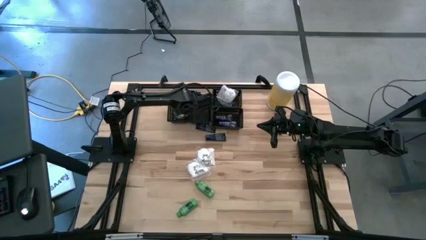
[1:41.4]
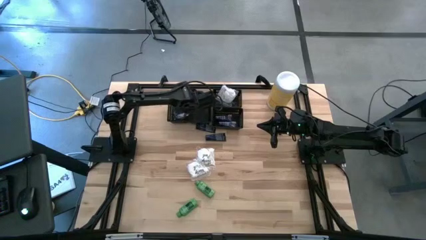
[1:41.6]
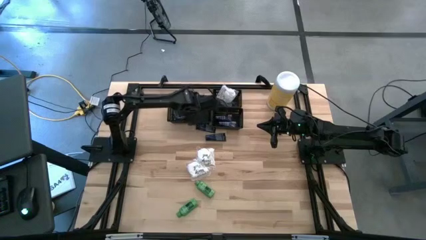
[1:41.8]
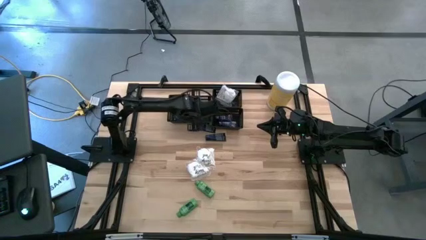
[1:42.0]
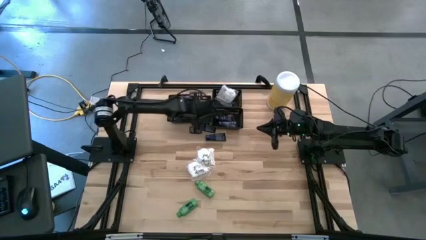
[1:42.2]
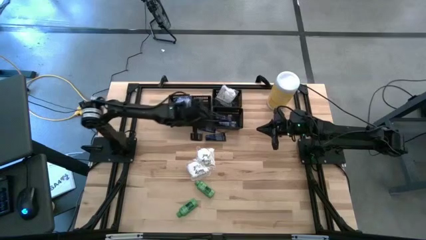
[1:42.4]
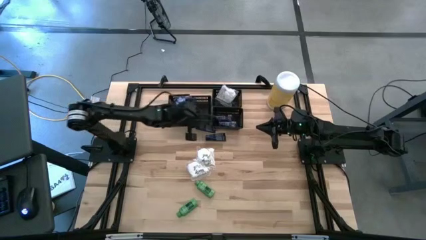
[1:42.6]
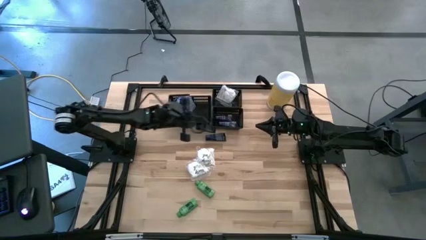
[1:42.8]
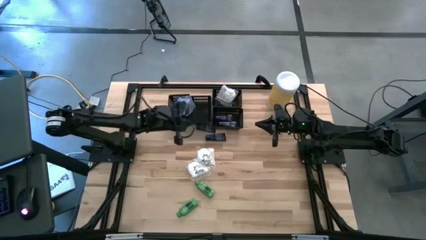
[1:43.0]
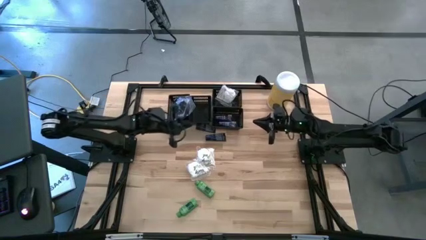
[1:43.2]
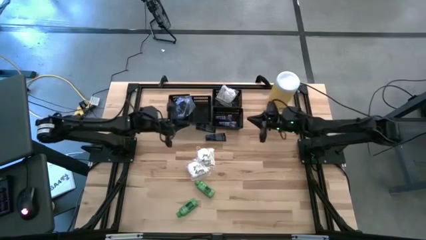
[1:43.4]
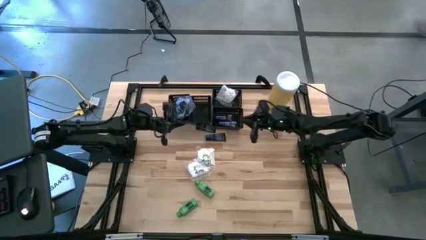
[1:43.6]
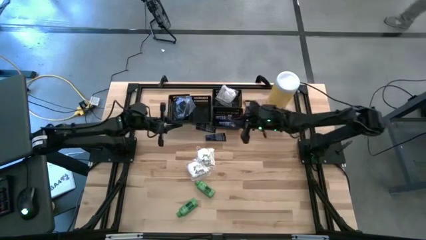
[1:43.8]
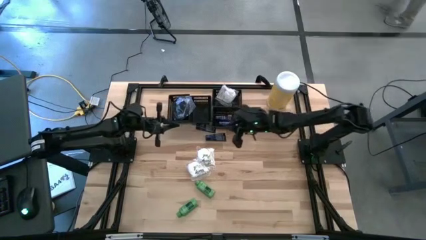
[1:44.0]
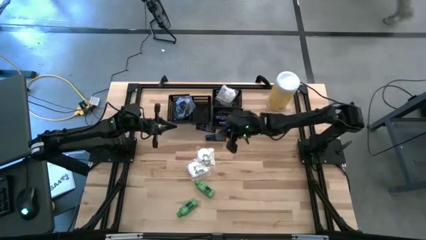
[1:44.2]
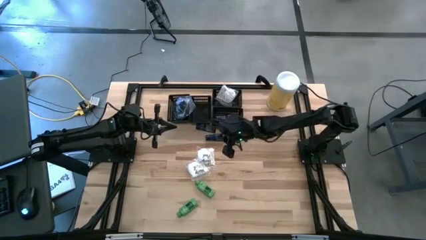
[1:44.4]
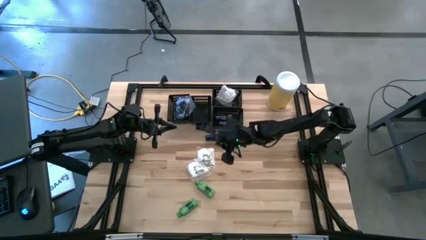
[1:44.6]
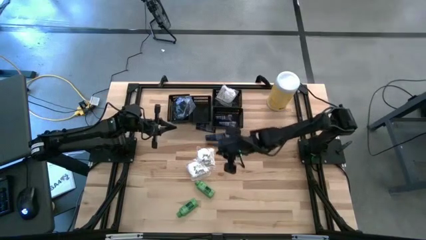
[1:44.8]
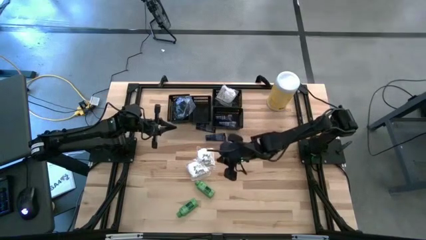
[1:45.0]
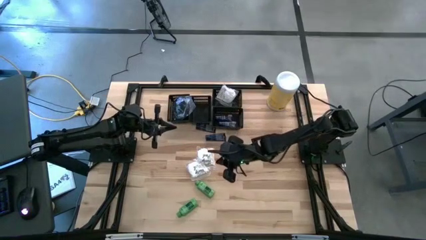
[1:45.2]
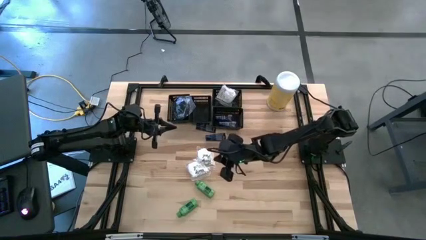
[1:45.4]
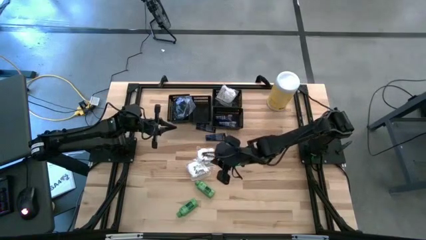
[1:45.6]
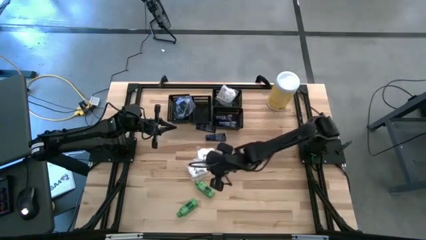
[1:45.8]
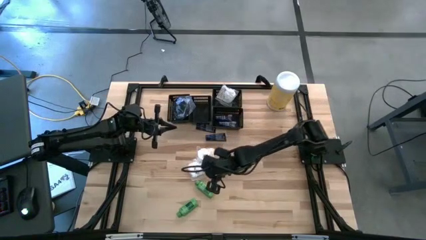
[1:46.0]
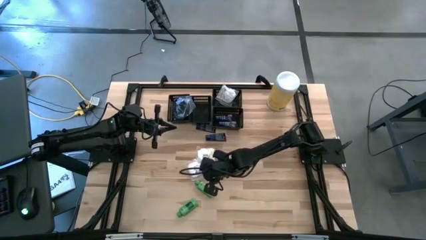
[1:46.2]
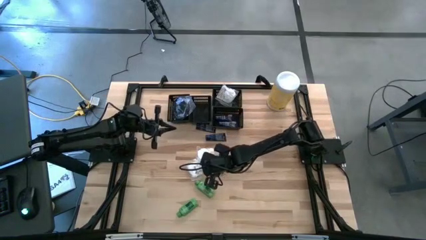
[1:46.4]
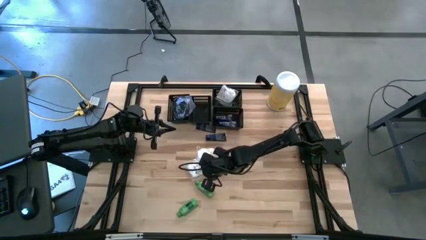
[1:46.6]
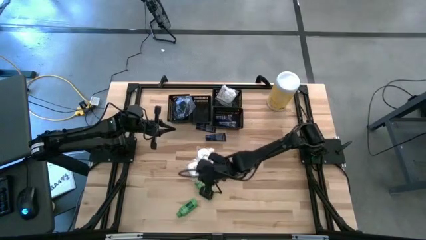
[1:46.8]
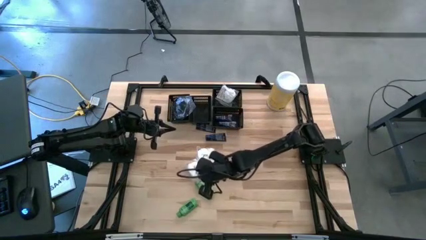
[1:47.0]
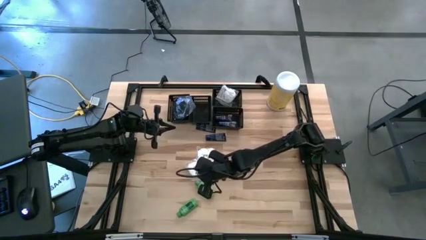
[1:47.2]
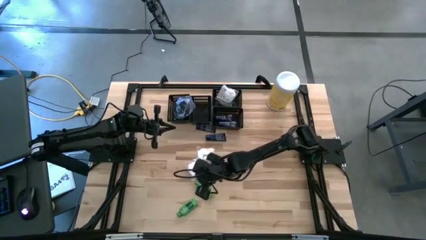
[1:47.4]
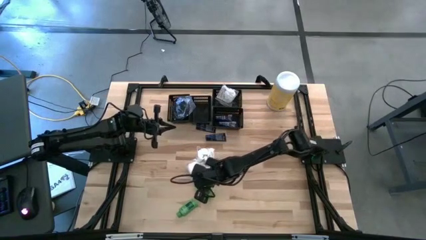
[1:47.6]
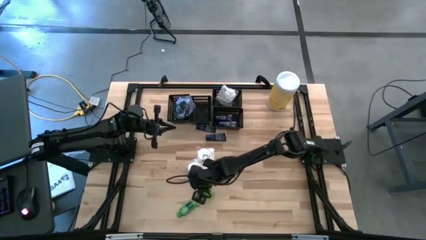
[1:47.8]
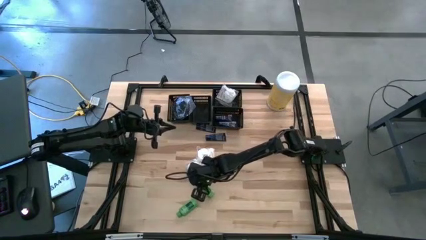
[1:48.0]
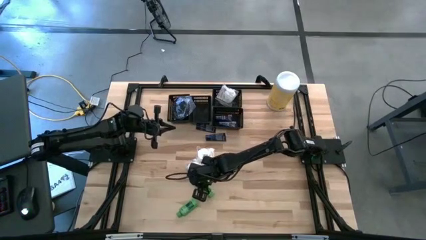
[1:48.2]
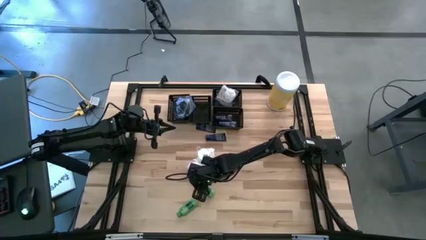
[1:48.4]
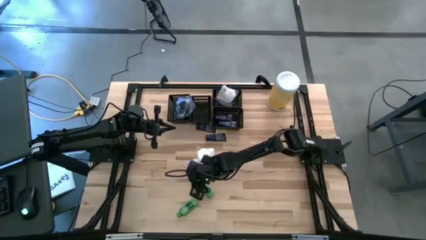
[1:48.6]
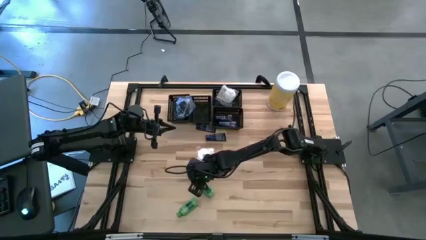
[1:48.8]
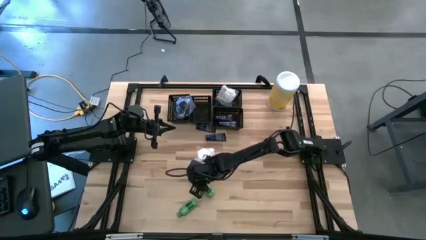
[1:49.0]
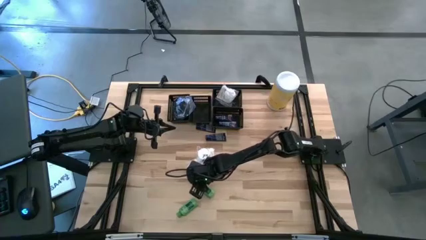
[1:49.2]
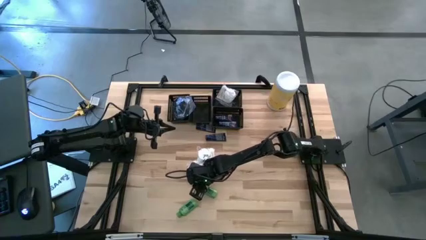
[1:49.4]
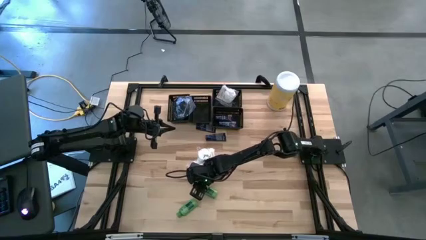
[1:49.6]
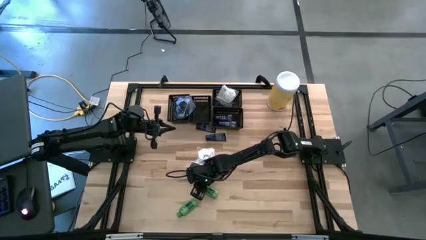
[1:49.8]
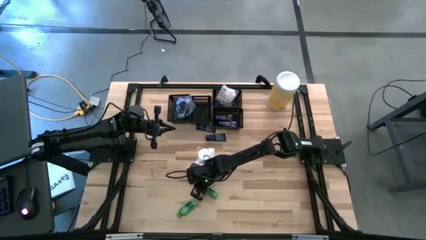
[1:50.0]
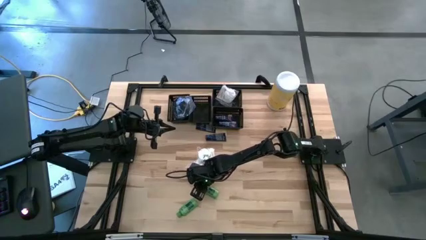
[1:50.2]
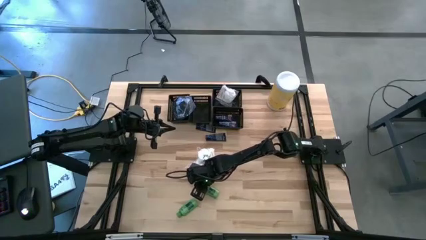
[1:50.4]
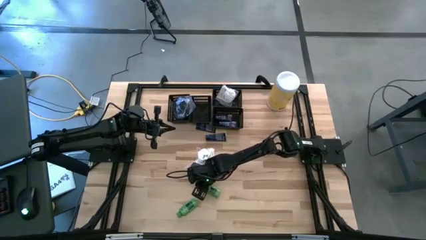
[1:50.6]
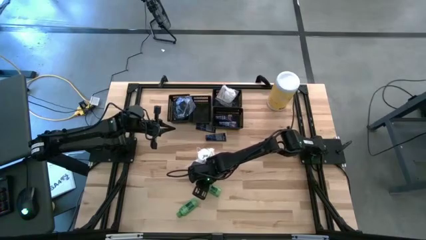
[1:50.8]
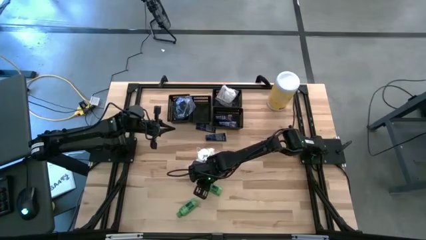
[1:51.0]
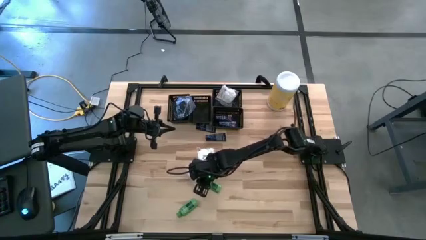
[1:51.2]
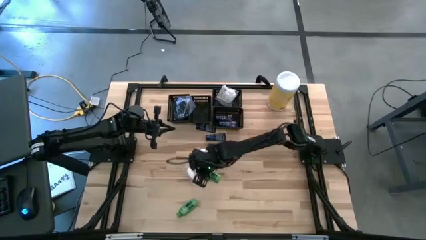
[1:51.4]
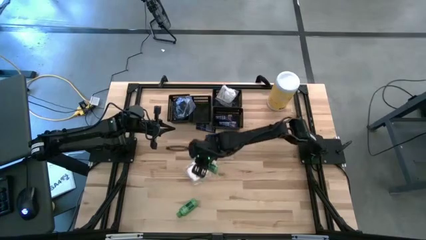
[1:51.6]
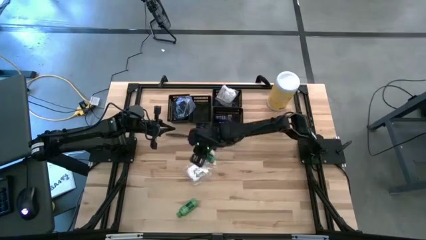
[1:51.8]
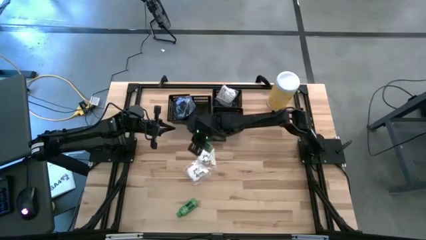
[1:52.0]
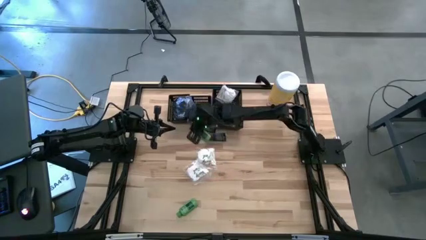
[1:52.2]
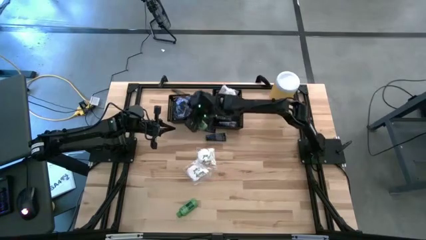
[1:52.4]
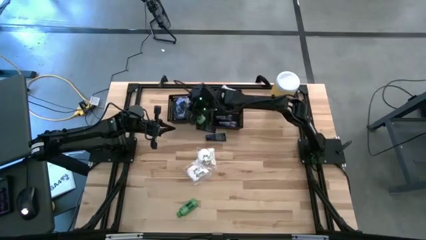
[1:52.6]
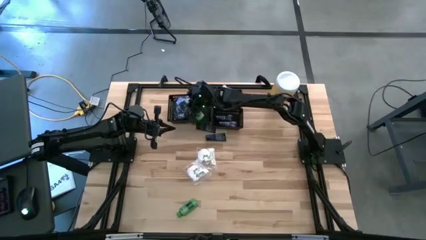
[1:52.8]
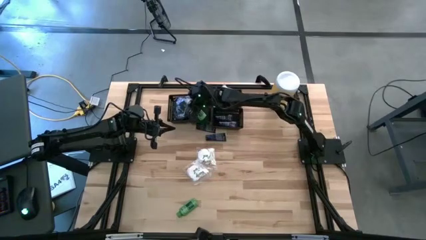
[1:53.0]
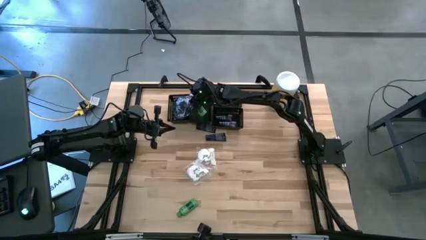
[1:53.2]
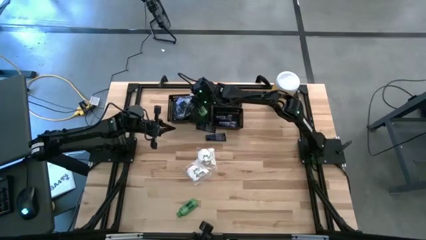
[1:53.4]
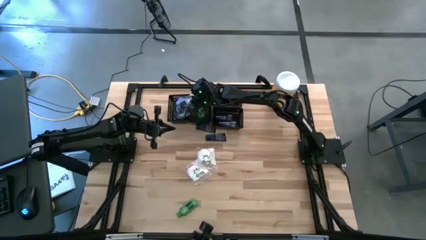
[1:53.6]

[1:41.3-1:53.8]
Task: Pick & Place Travel size toiletries
Put the top green shampoo bottle into the right black bin

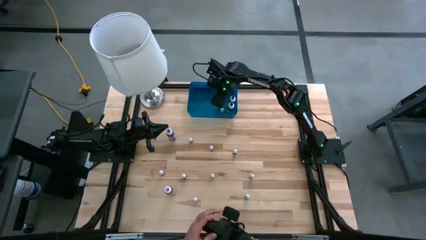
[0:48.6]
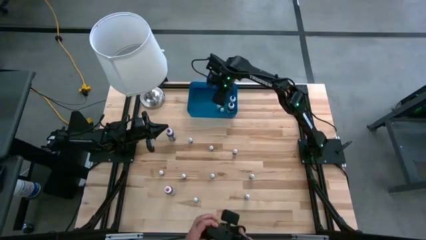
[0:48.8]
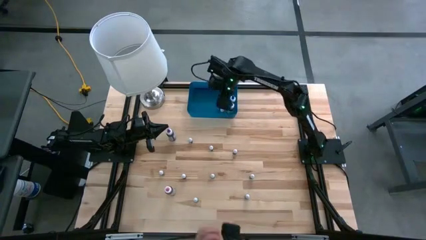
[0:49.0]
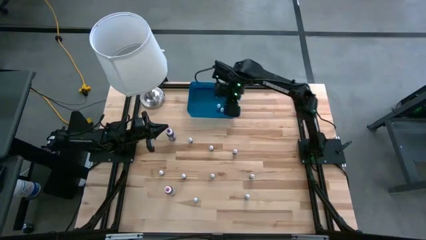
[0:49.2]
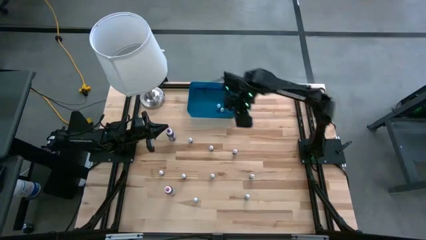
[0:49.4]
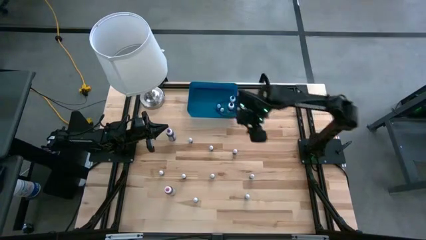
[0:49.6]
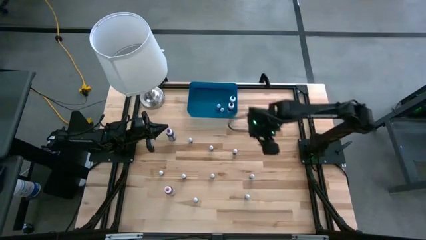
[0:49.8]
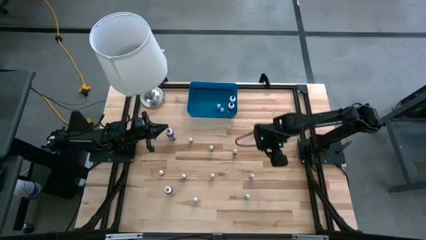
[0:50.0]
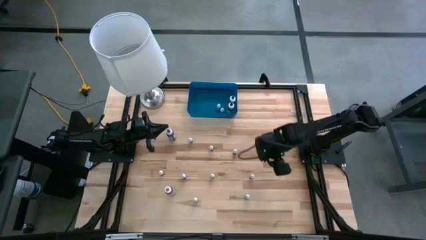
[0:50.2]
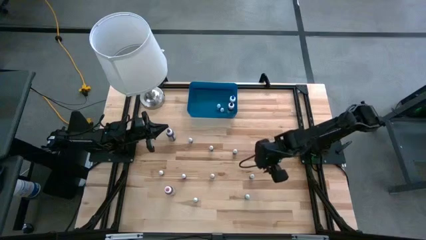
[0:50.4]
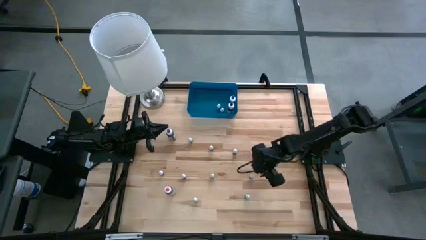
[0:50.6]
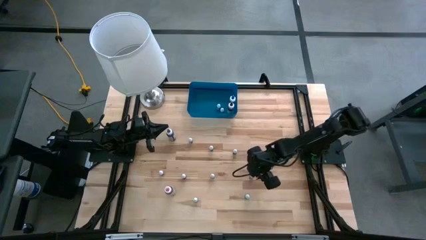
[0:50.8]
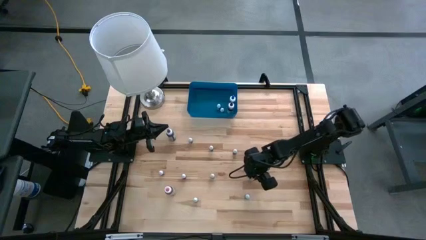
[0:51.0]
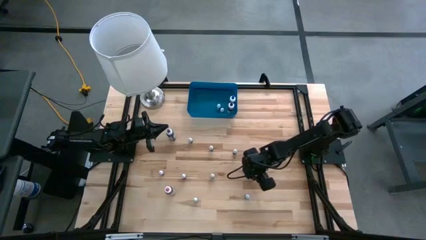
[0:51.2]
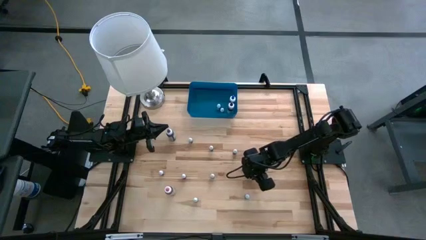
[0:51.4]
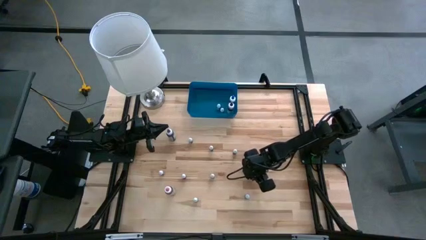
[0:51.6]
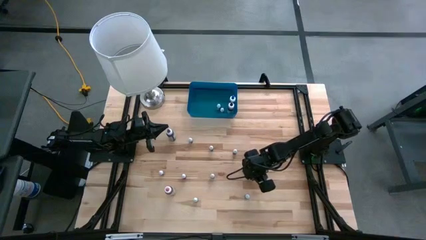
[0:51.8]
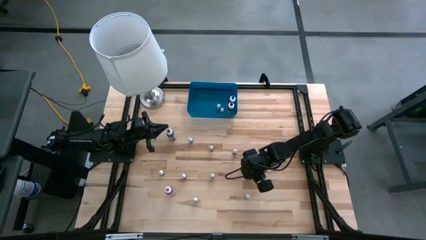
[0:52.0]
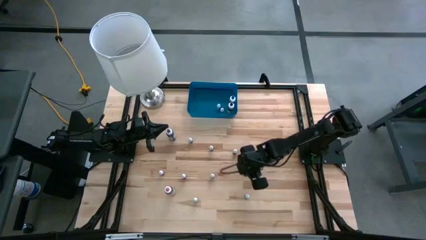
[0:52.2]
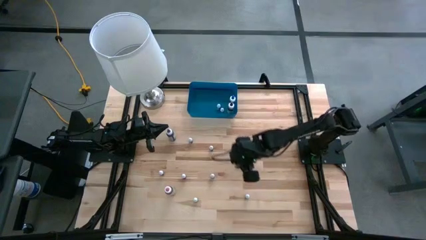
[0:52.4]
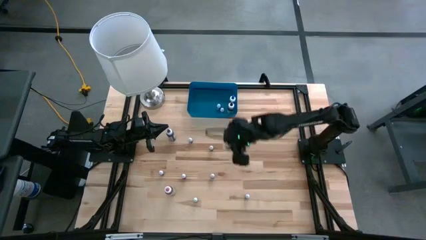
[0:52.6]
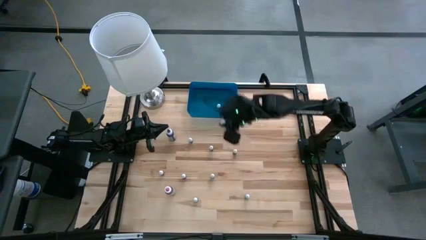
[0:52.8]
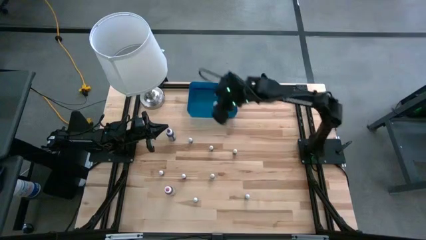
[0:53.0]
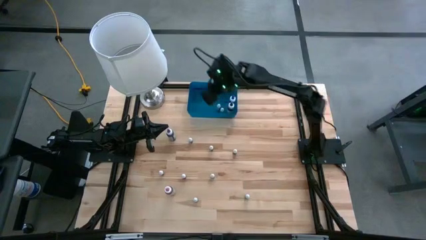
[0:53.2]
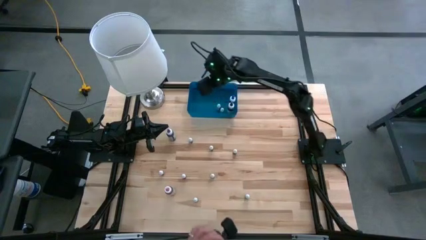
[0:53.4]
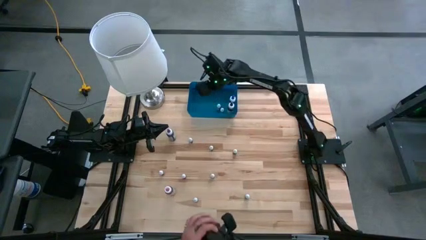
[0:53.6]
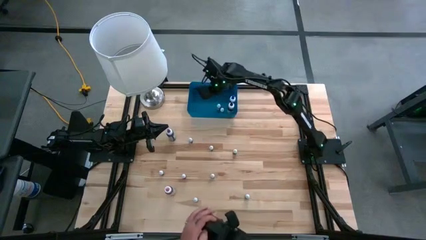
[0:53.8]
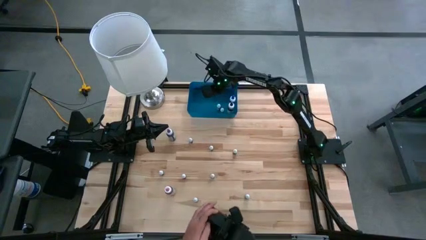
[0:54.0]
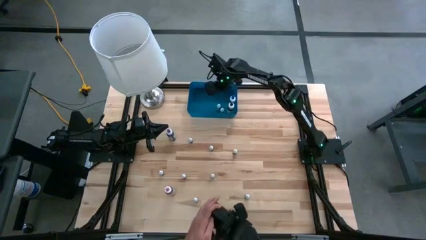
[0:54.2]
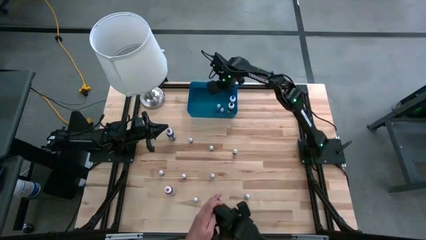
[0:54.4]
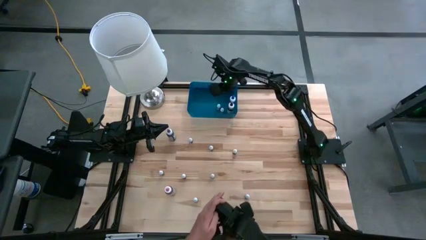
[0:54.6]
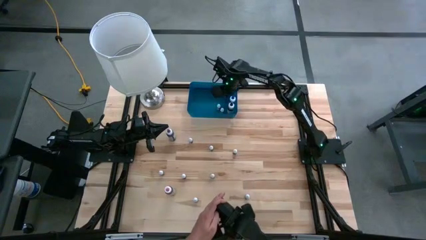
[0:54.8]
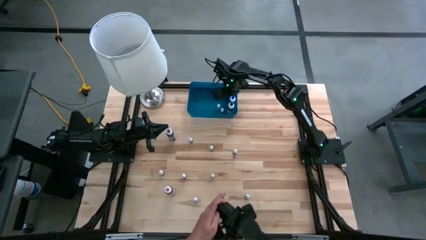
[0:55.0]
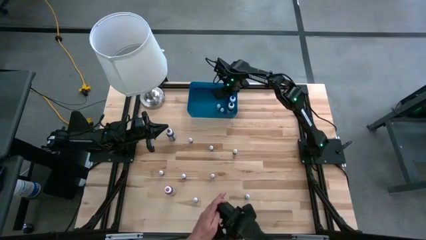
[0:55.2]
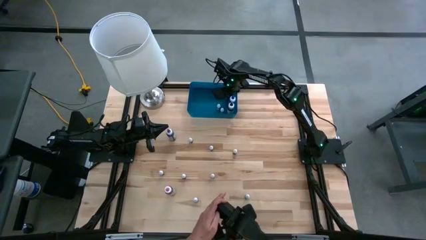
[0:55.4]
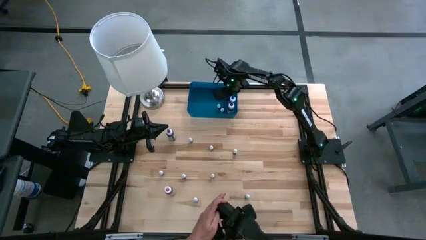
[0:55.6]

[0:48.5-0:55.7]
Task: Pick & Place food coloring
Put the small black food coloring bottle into the blue bin
